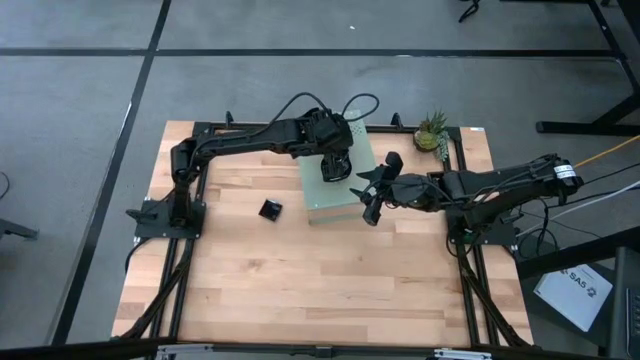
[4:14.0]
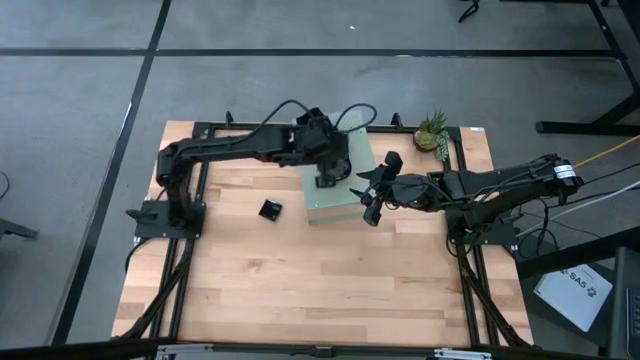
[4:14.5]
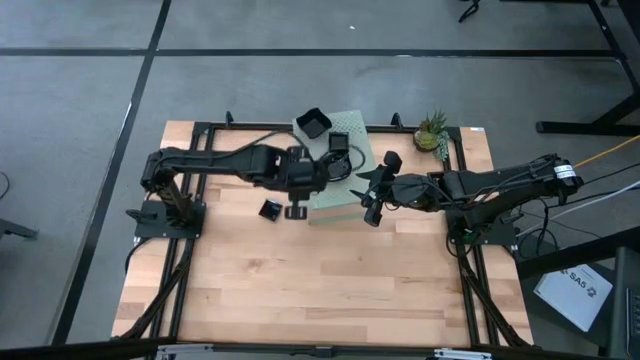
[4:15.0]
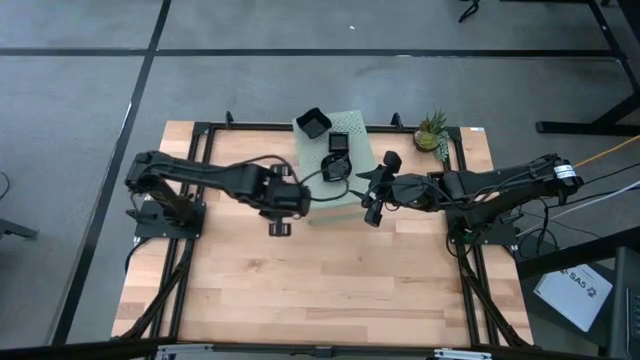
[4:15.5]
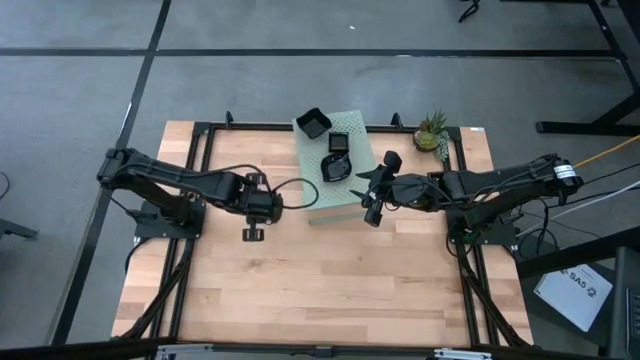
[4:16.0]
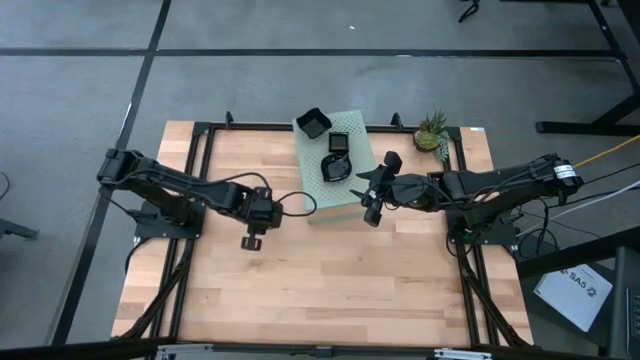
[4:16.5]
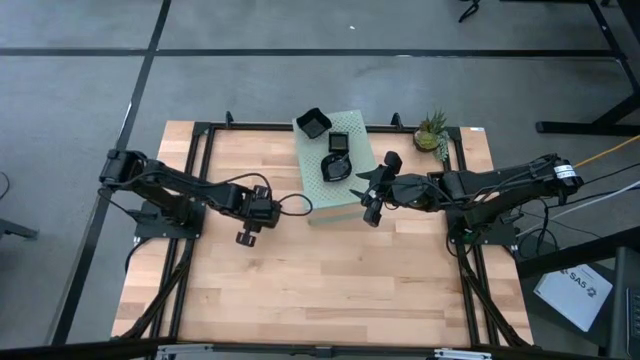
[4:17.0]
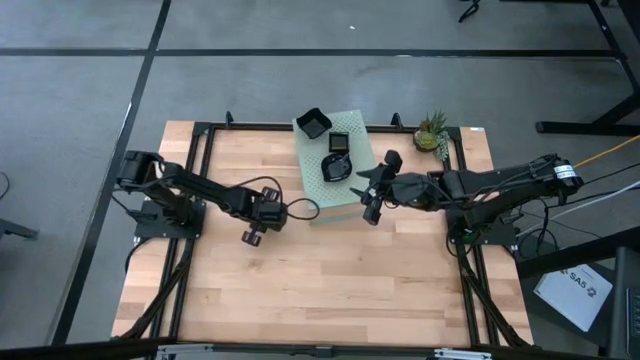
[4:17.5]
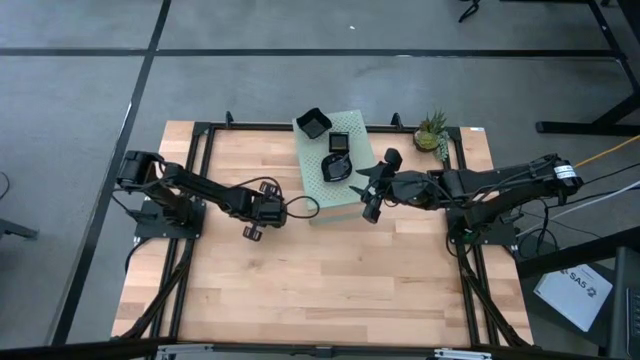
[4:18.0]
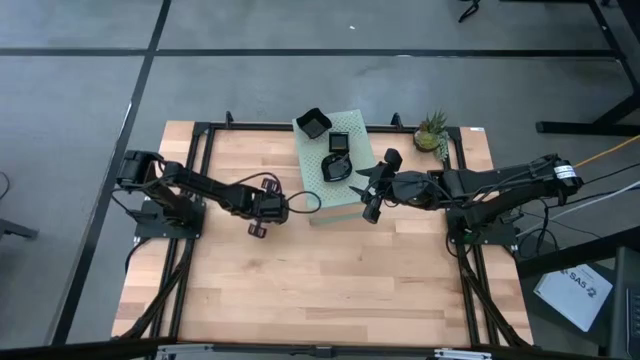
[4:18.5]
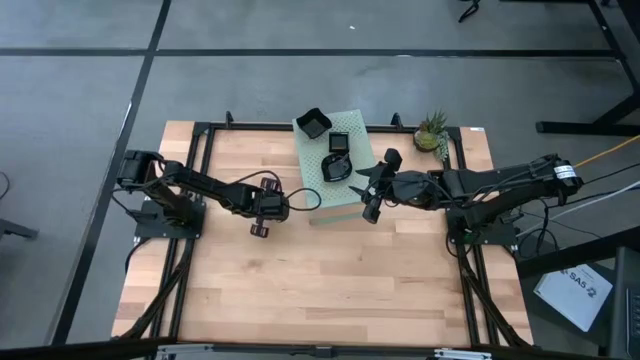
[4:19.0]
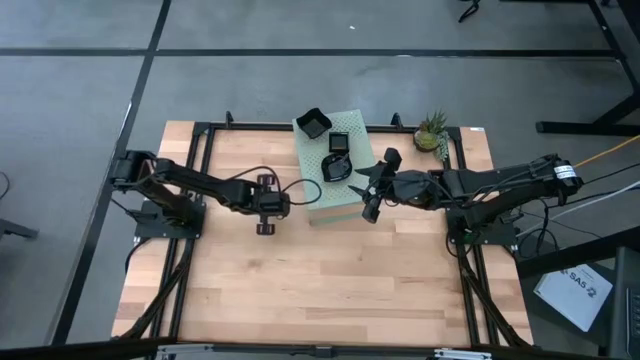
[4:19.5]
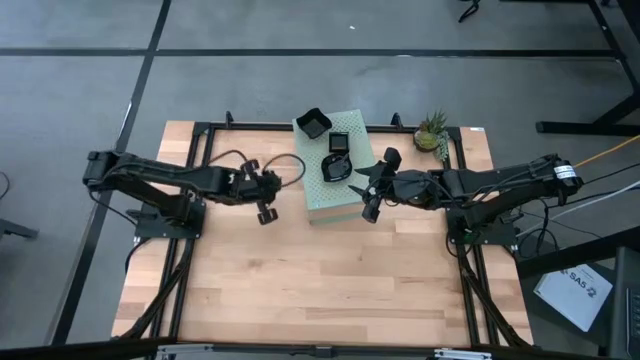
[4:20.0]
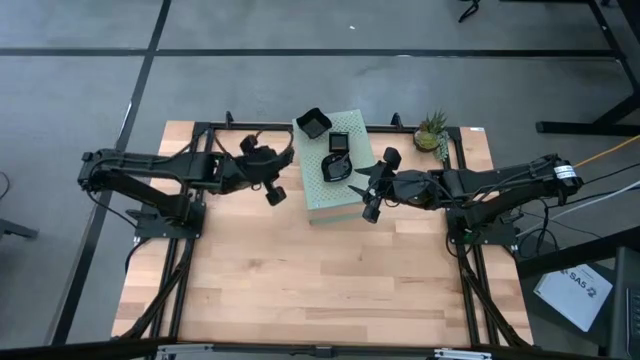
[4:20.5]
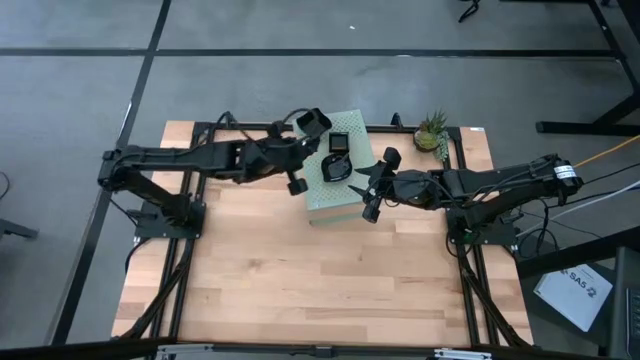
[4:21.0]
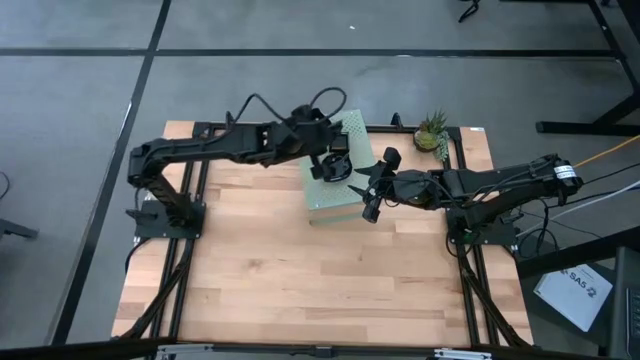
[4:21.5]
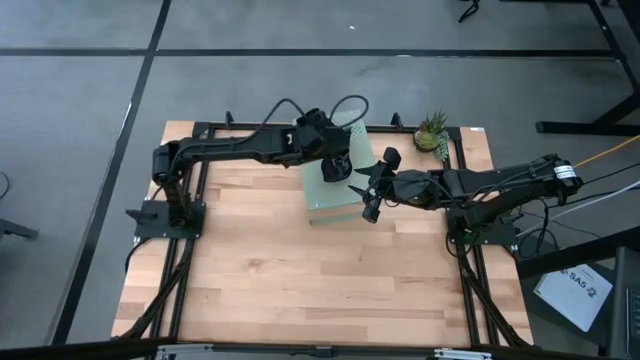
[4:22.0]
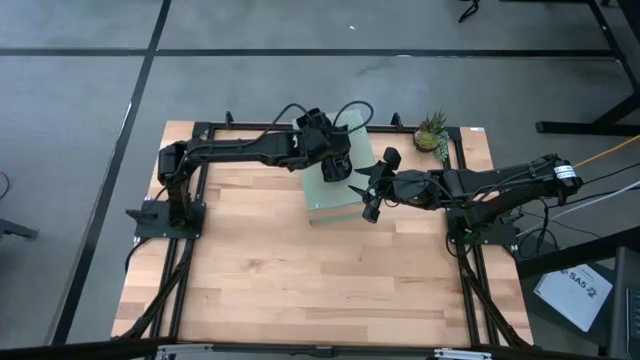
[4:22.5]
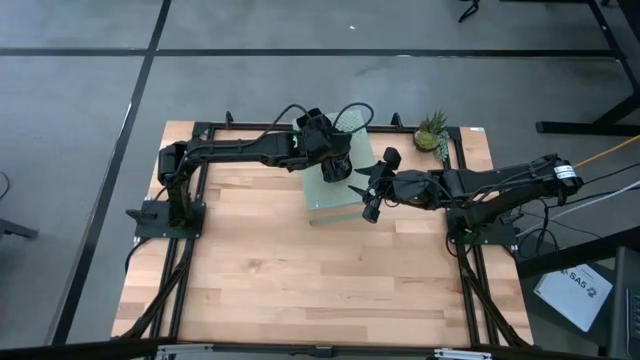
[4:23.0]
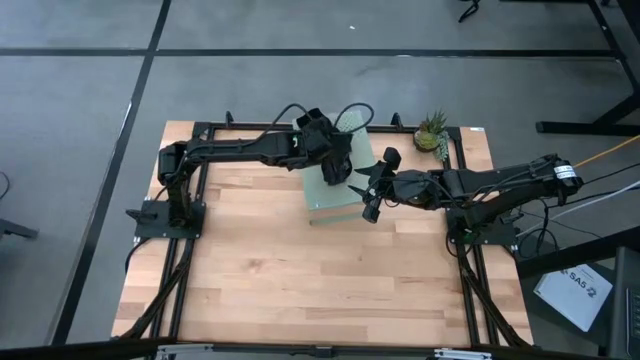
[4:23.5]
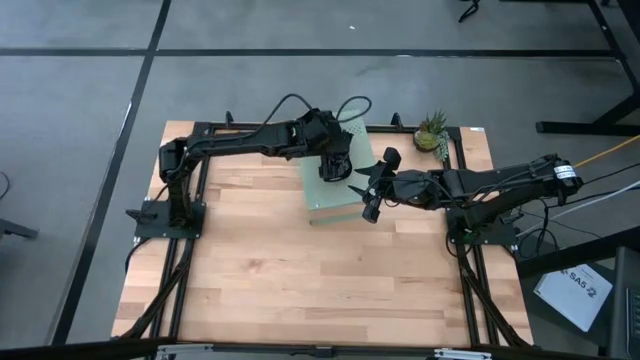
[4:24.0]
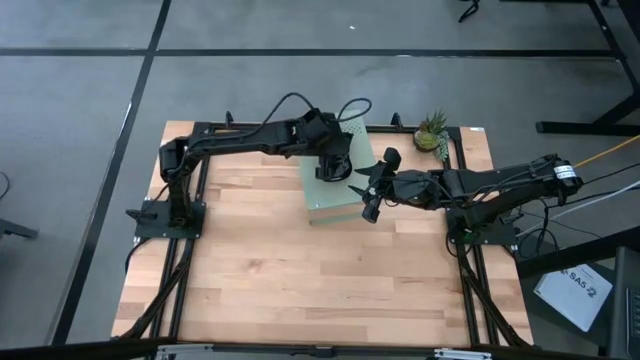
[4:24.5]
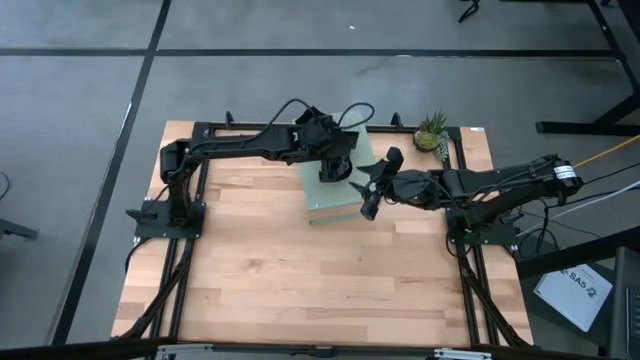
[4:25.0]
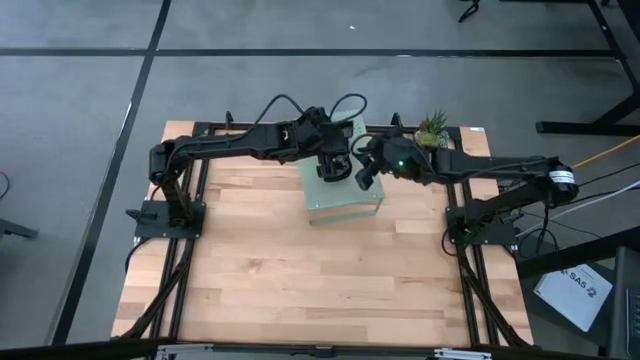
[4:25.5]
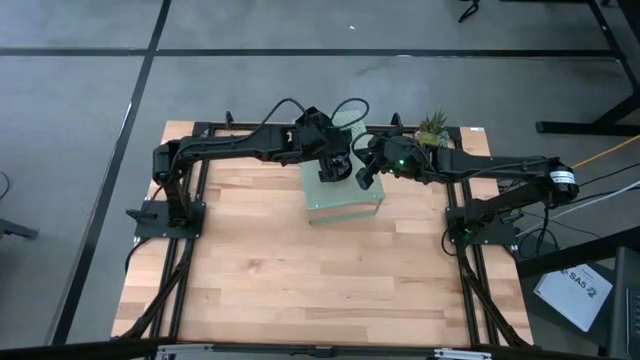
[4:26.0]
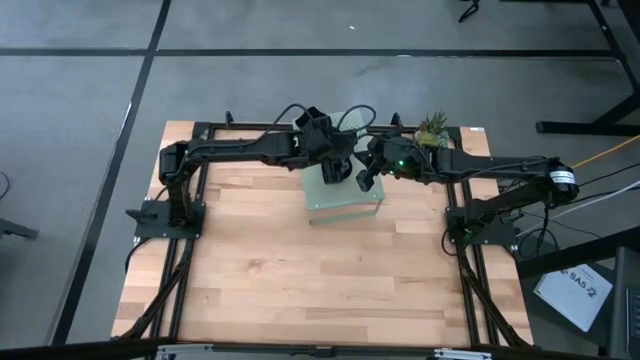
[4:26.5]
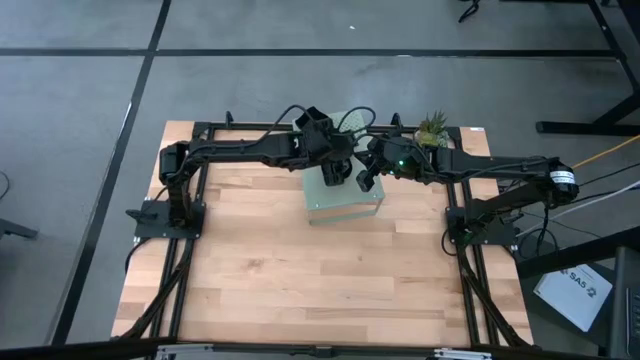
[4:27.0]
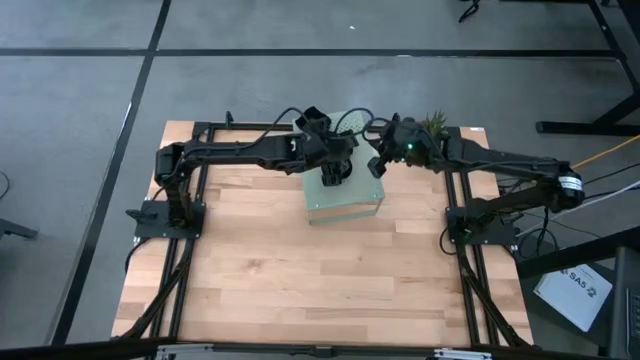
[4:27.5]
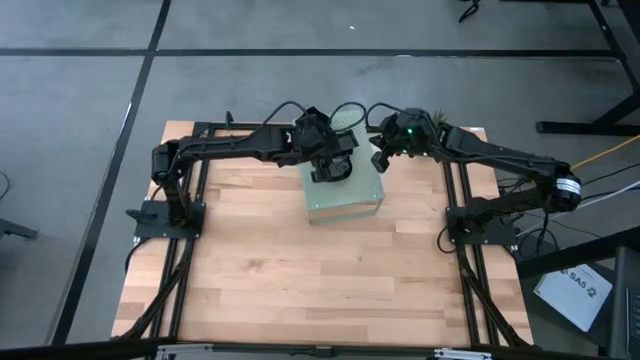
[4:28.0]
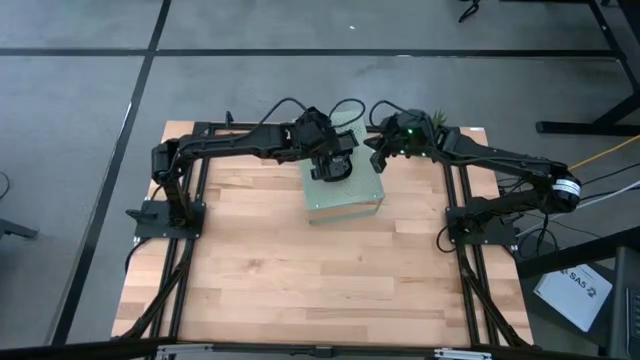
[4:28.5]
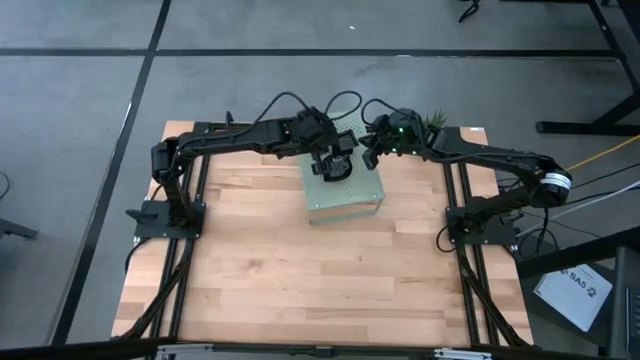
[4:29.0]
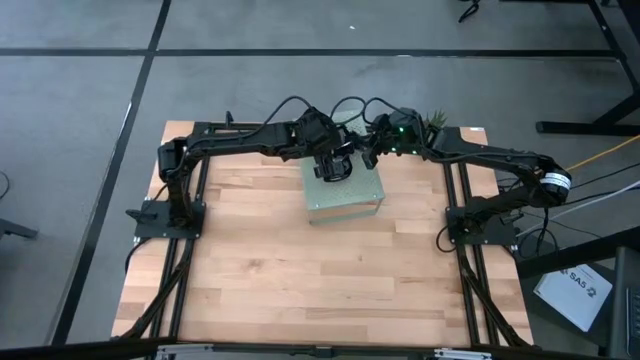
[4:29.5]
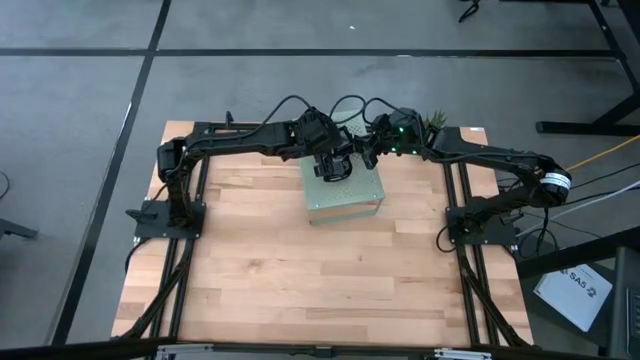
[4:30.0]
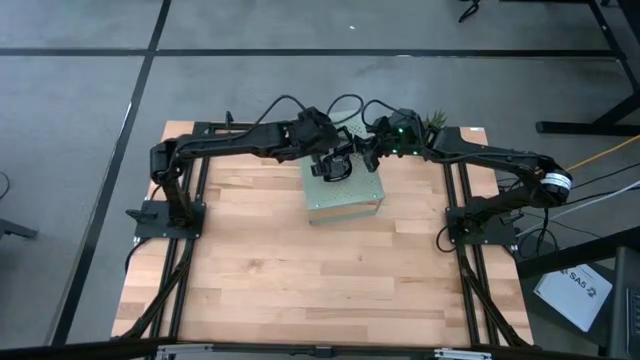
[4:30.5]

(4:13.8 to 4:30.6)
Task: Pick & Place Mini shaped plates
Stack the black square plate on top of the black square plates on the shelf

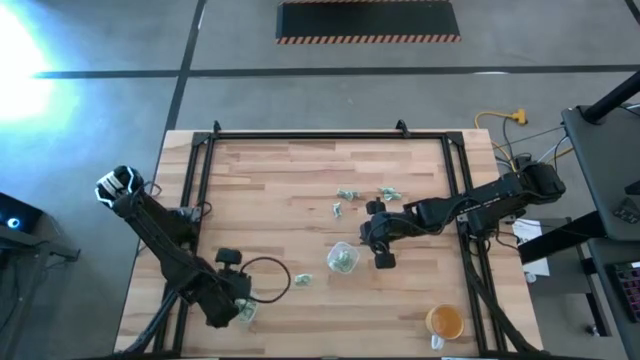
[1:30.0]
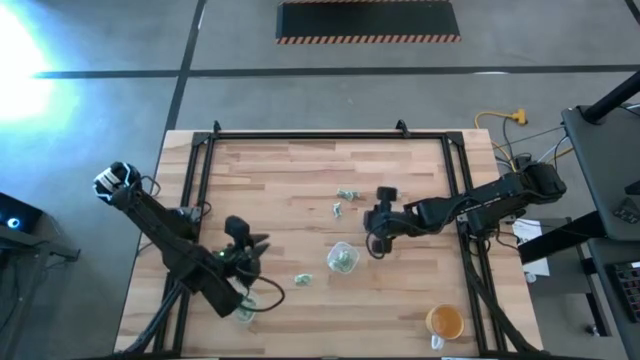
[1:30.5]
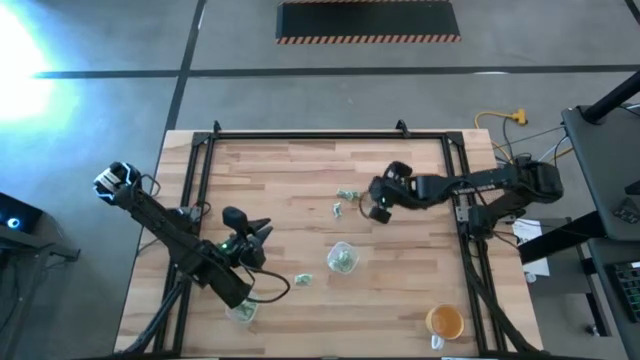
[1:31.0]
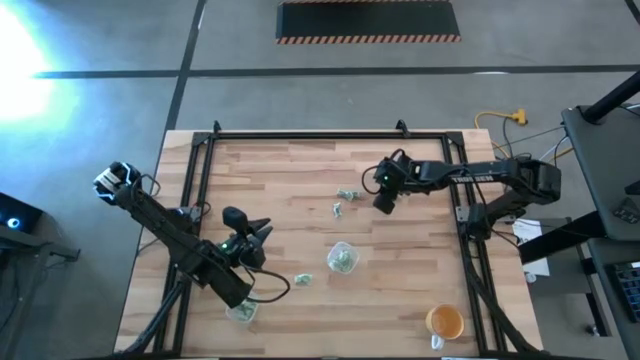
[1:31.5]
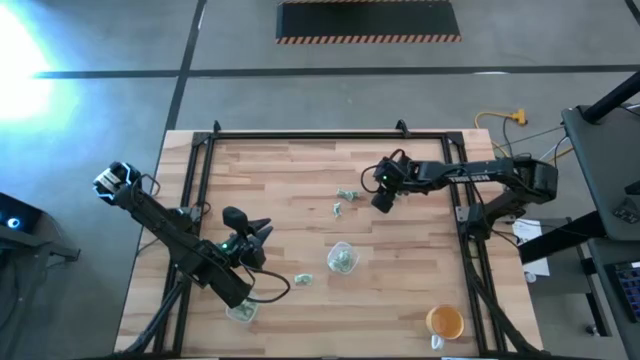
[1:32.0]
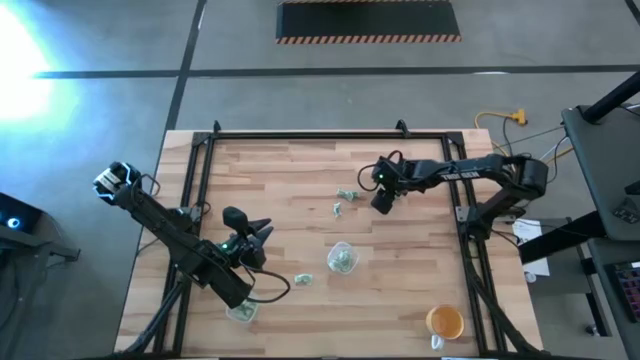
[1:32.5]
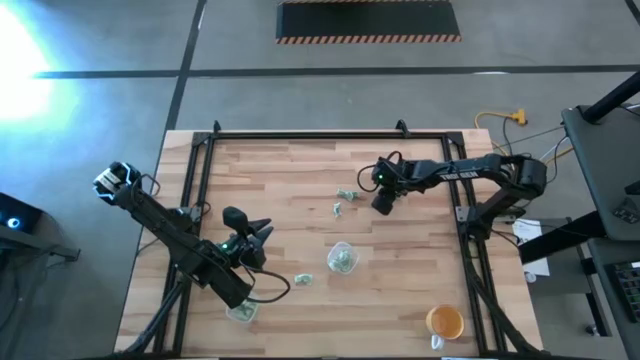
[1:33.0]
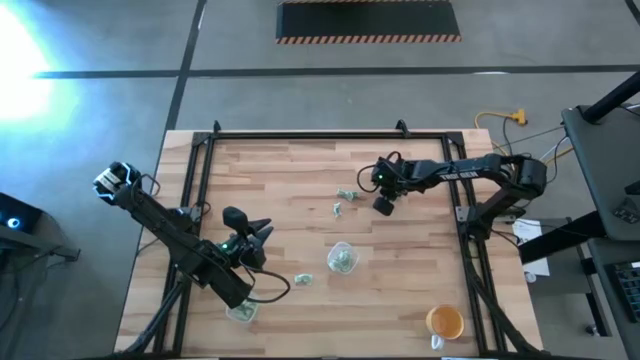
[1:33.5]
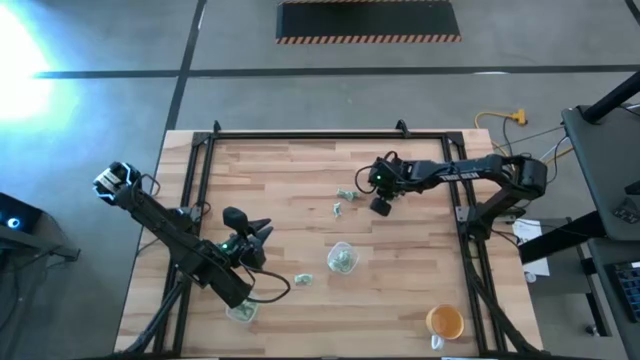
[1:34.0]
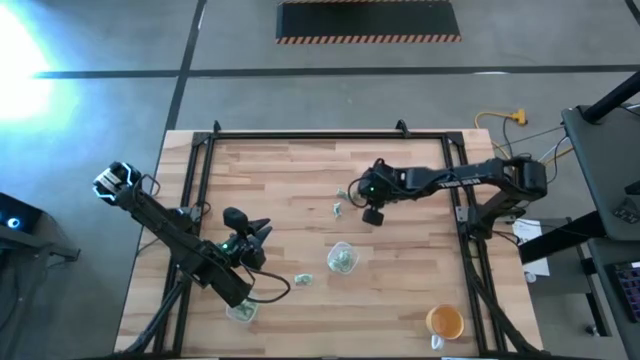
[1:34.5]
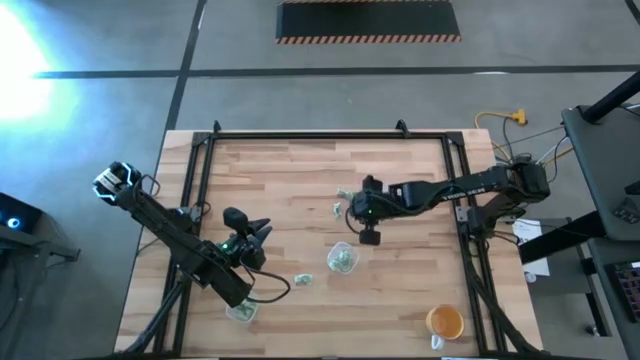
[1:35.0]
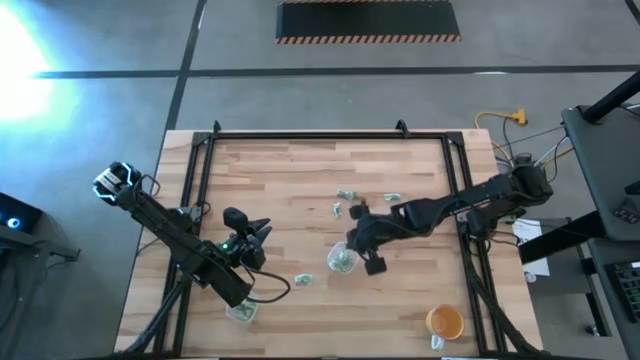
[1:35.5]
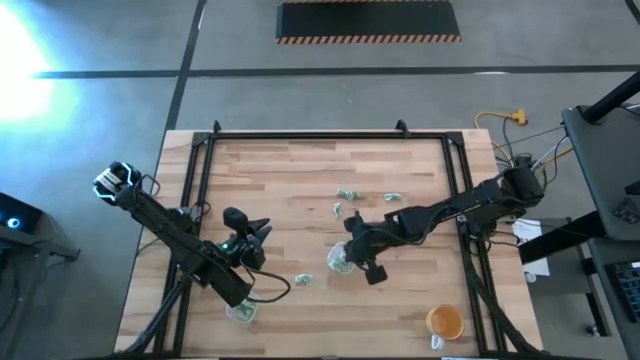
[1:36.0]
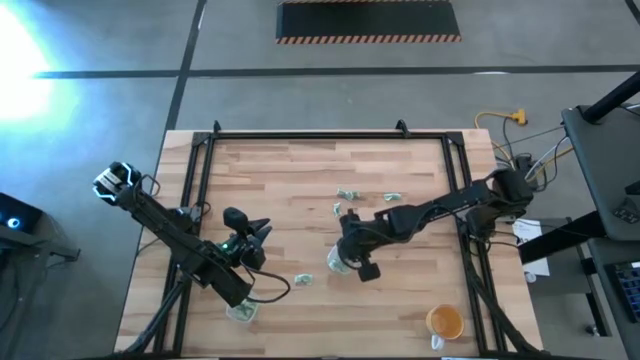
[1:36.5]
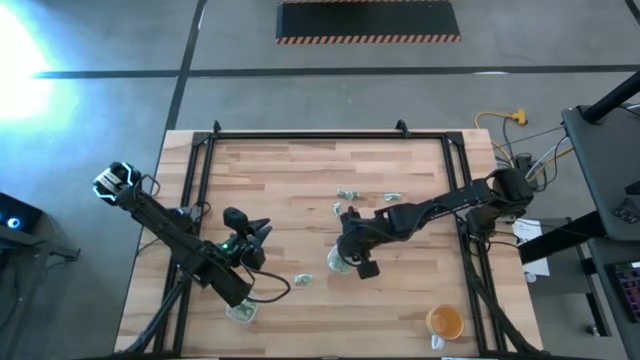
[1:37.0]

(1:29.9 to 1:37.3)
Task: Pick and place items into bin
Put the light green packet into the top transparent bin
